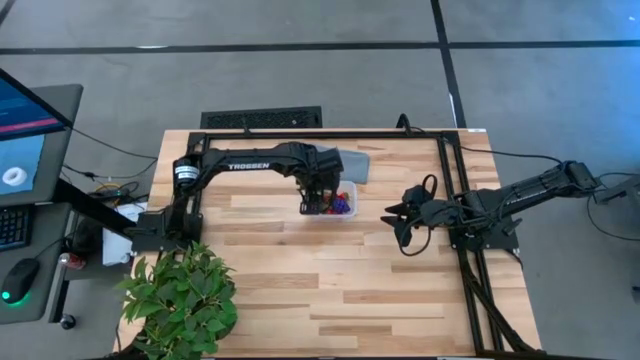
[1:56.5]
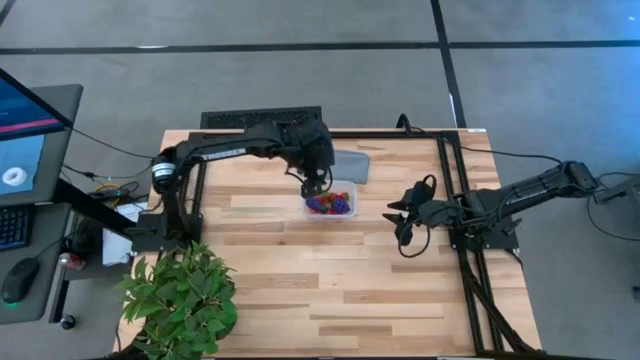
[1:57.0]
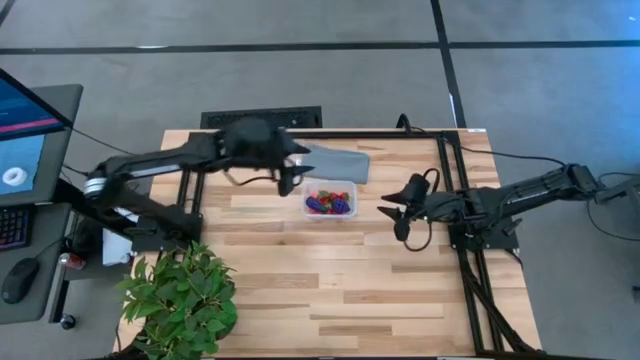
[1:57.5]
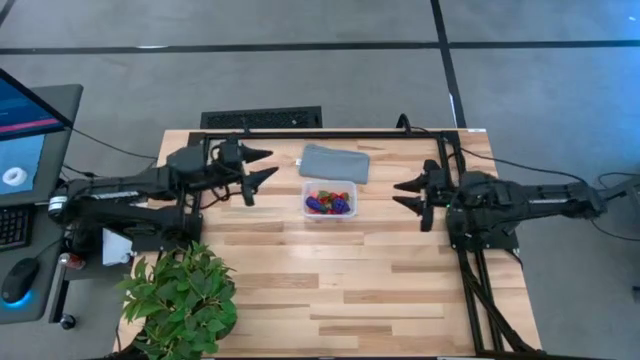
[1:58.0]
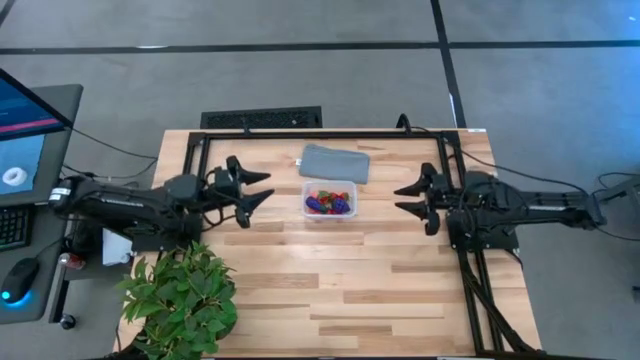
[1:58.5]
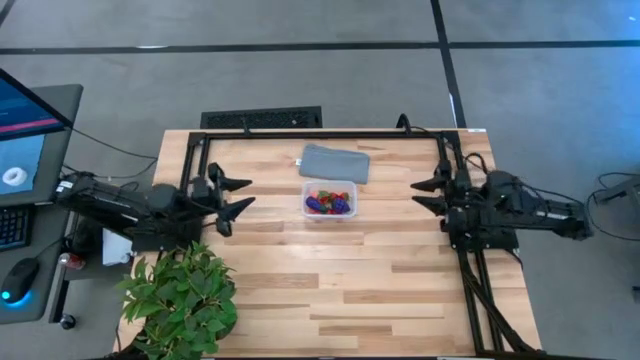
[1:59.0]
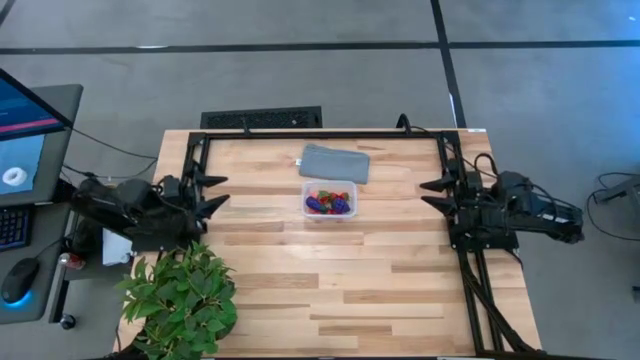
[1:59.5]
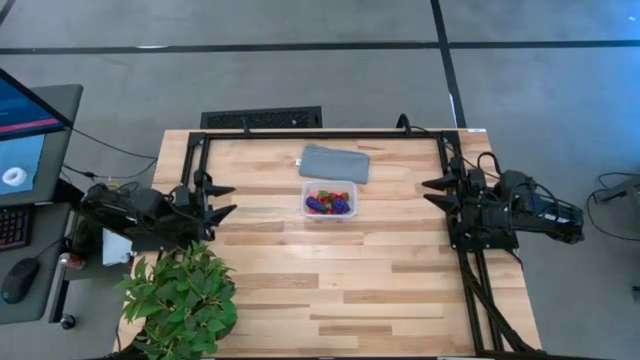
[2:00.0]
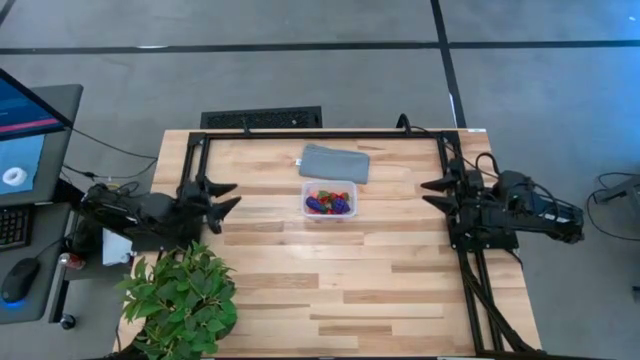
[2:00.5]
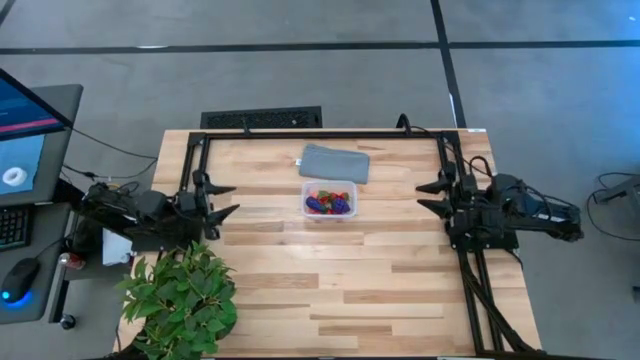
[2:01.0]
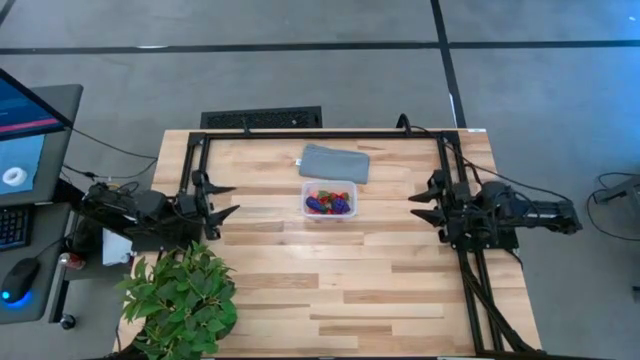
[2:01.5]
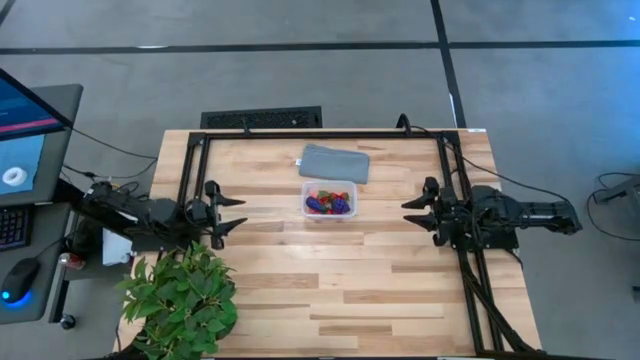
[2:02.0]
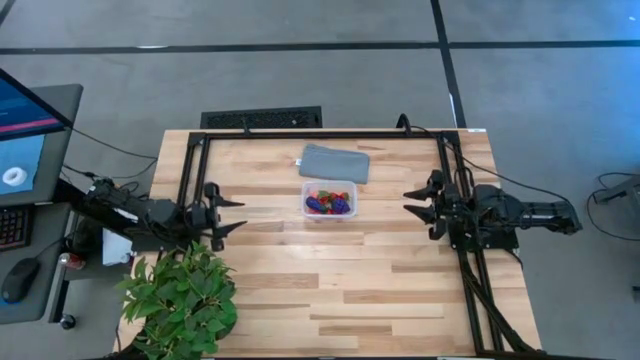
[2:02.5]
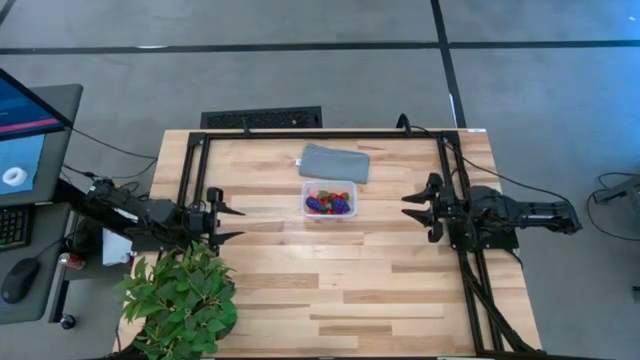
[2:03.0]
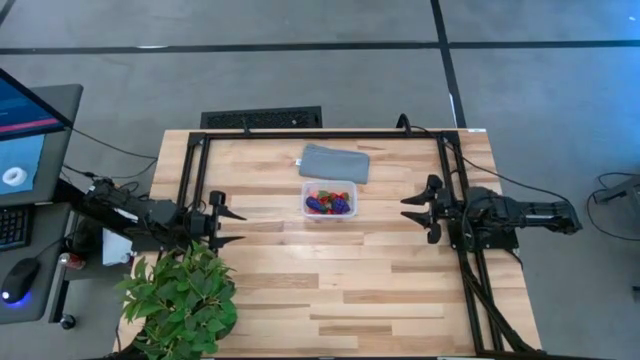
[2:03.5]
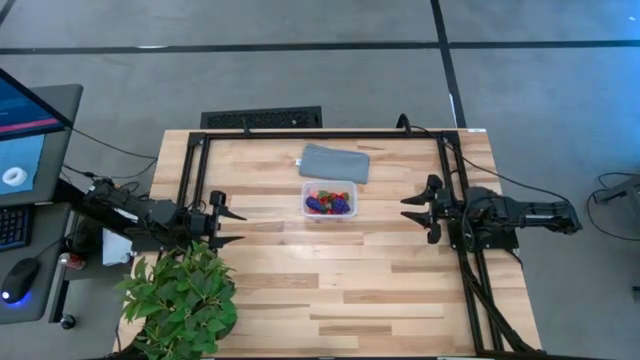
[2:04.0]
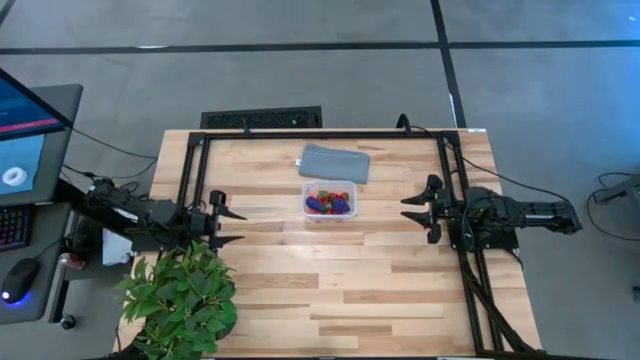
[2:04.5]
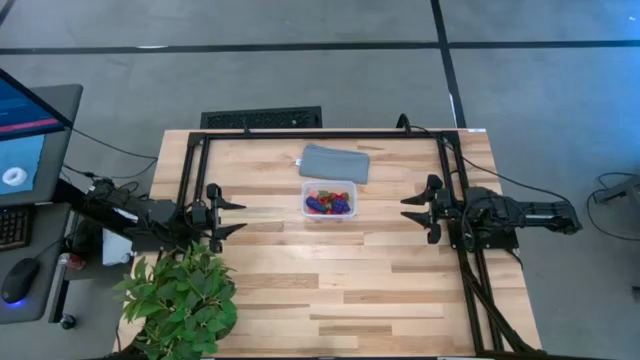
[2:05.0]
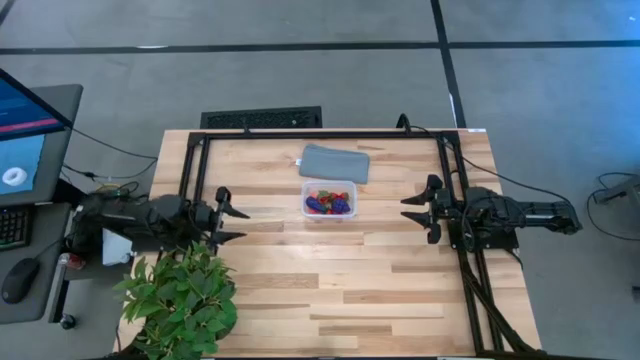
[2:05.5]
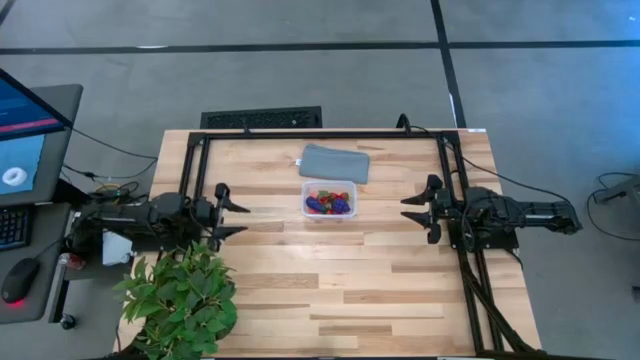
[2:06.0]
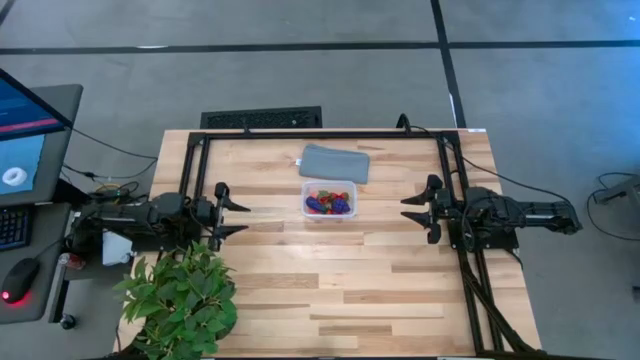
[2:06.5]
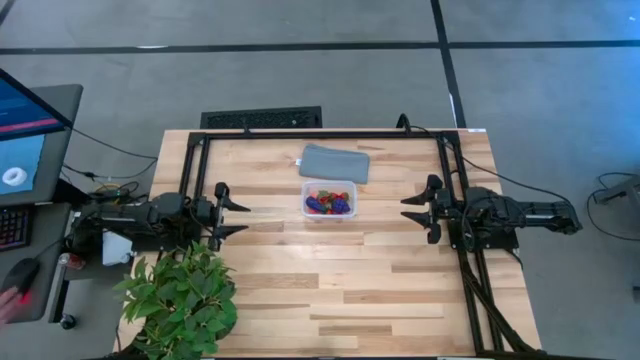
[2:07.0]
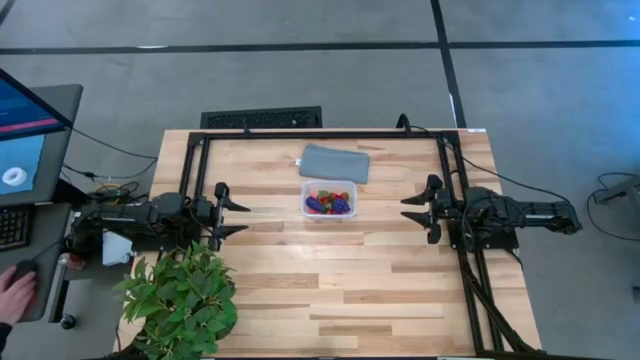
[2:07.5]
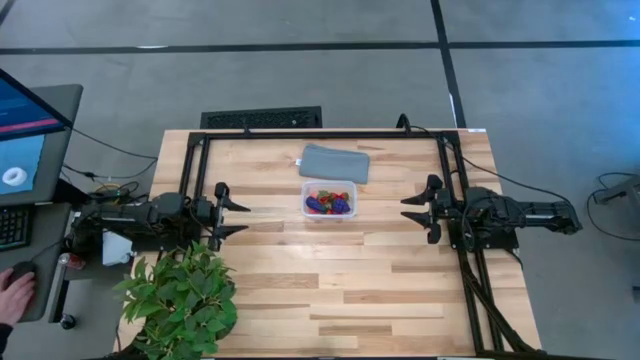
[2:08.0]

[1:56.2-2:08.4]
Task: Pick and placing Produce into tupperware
Return to Home Position

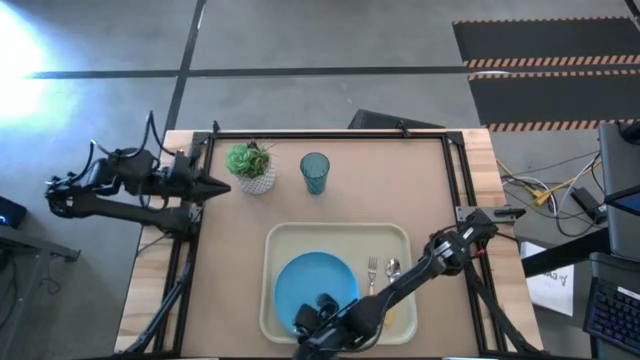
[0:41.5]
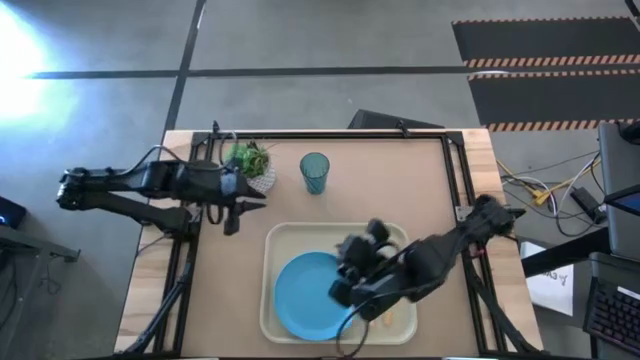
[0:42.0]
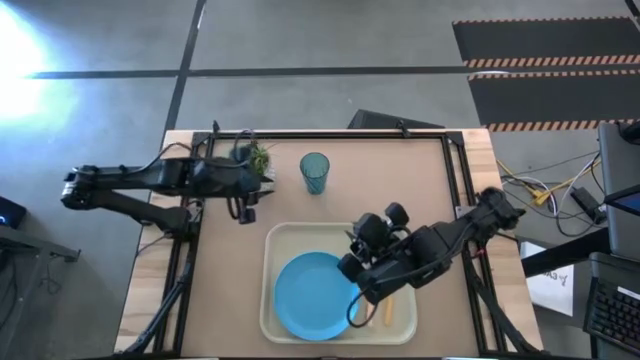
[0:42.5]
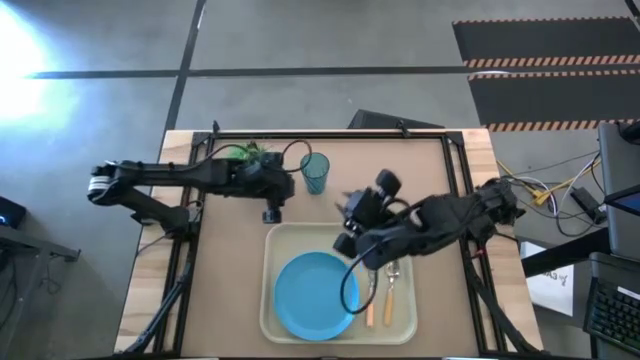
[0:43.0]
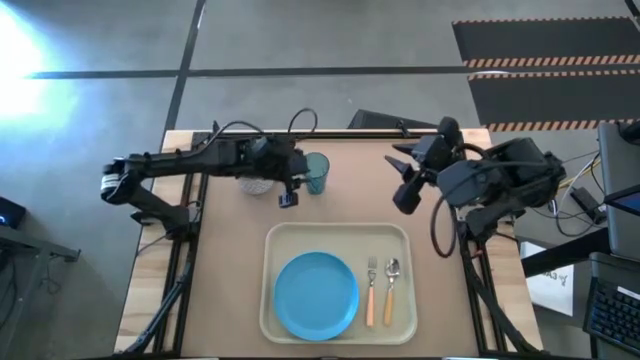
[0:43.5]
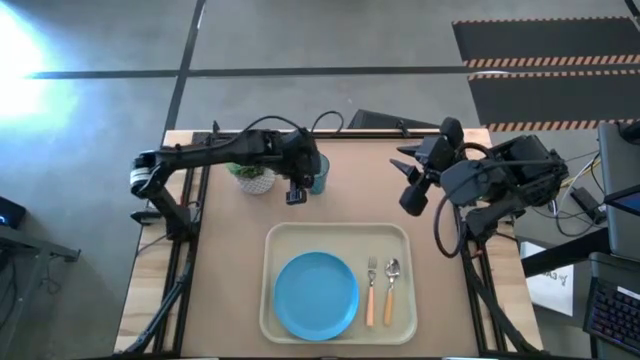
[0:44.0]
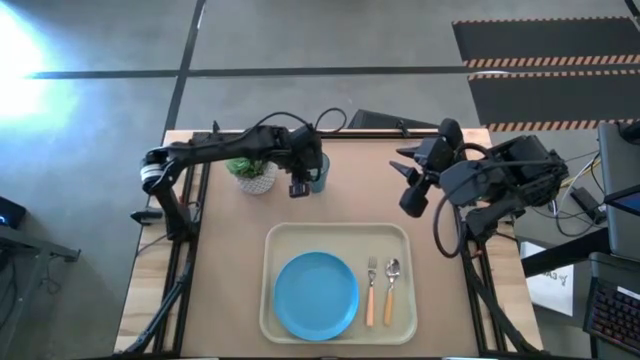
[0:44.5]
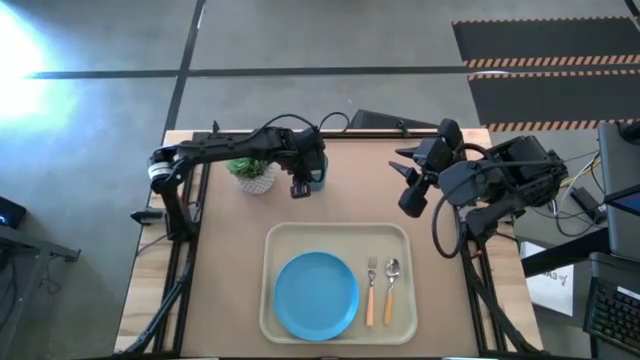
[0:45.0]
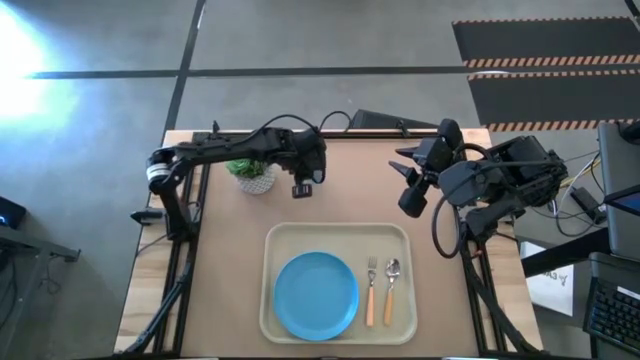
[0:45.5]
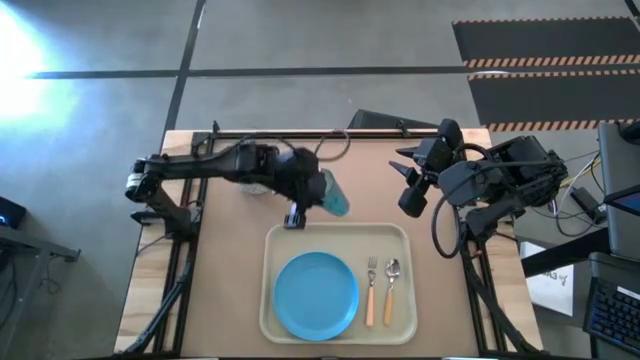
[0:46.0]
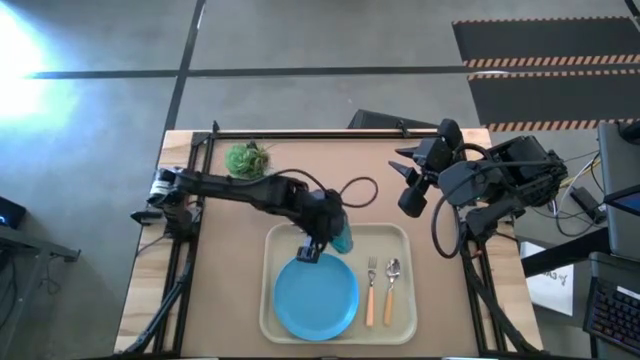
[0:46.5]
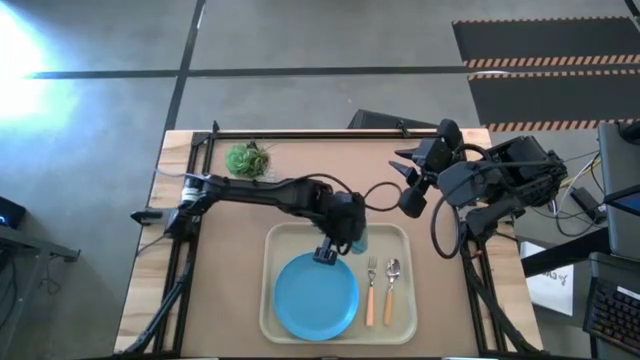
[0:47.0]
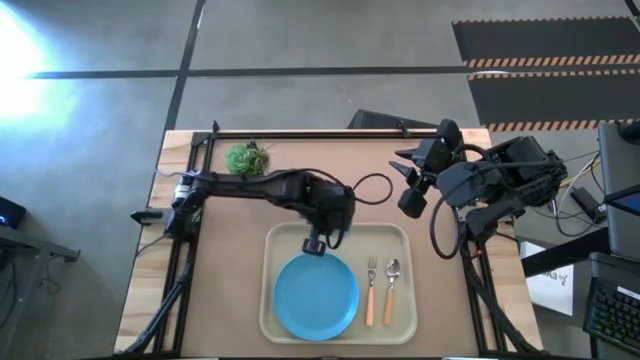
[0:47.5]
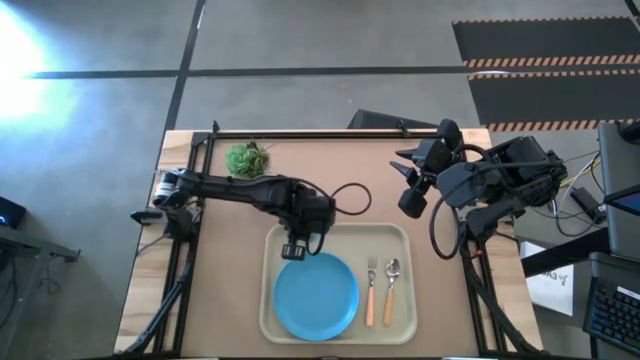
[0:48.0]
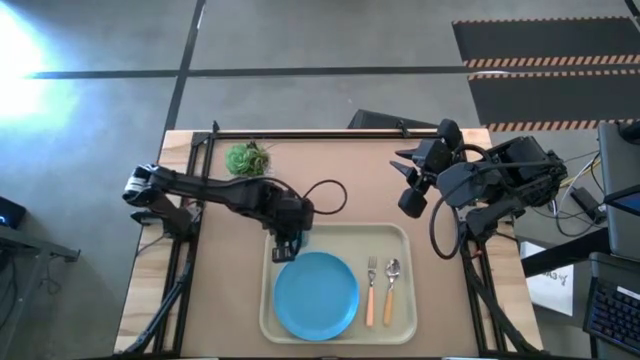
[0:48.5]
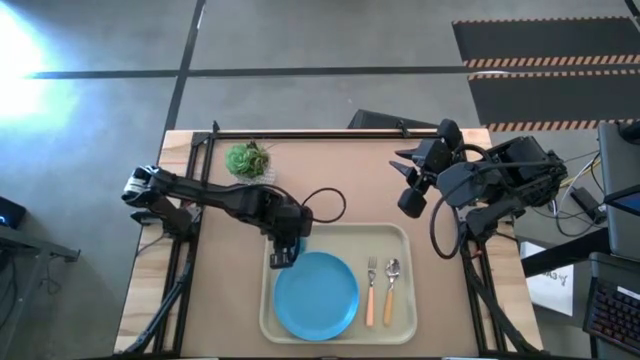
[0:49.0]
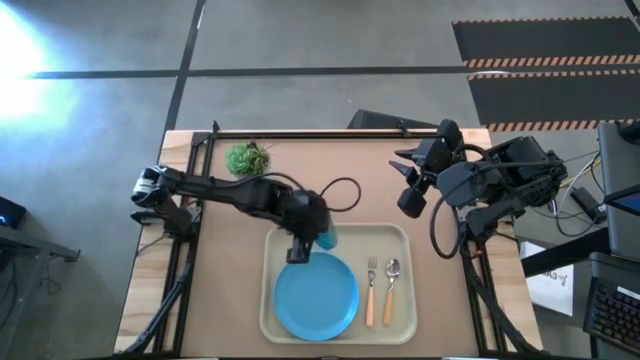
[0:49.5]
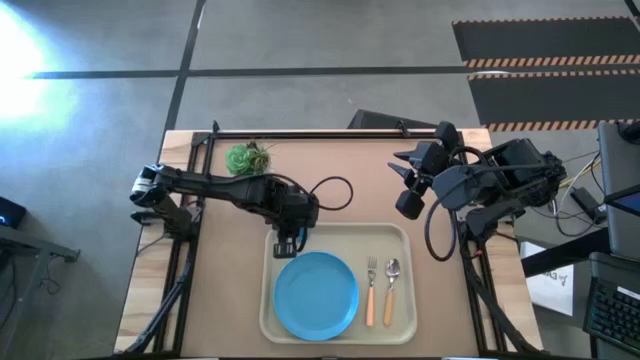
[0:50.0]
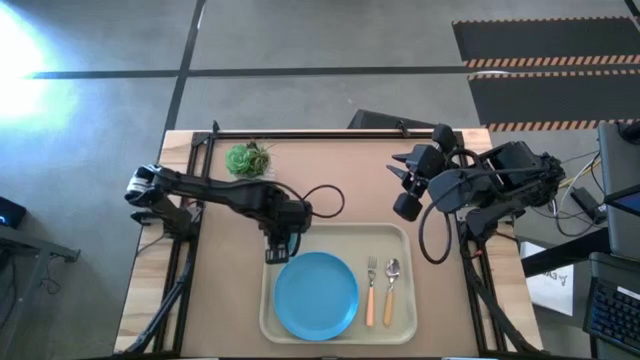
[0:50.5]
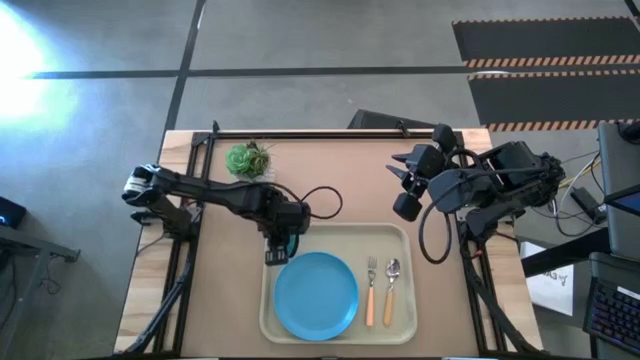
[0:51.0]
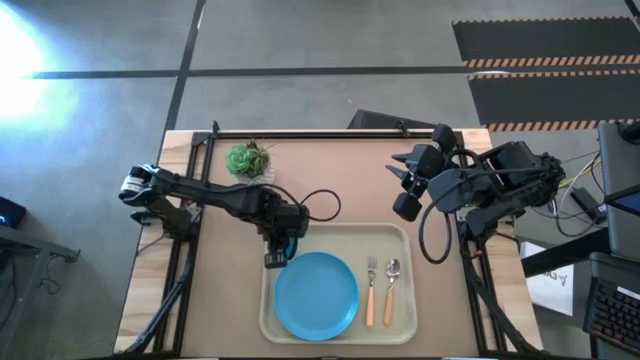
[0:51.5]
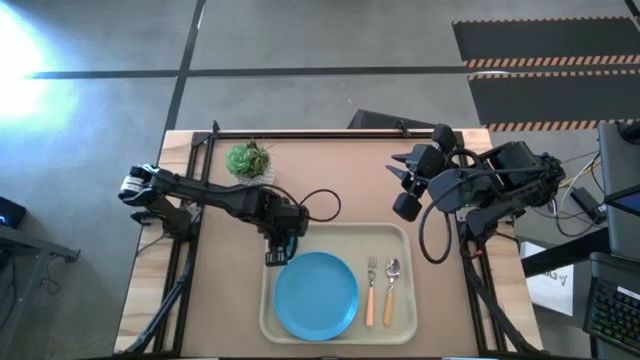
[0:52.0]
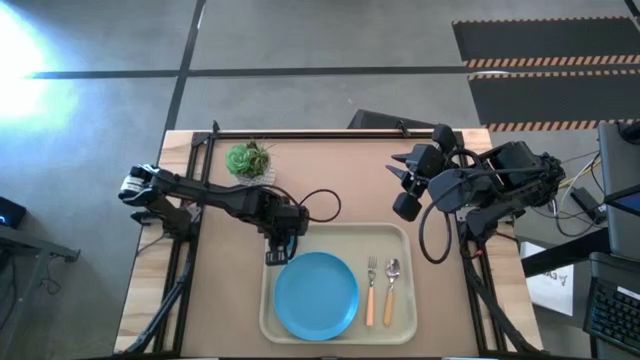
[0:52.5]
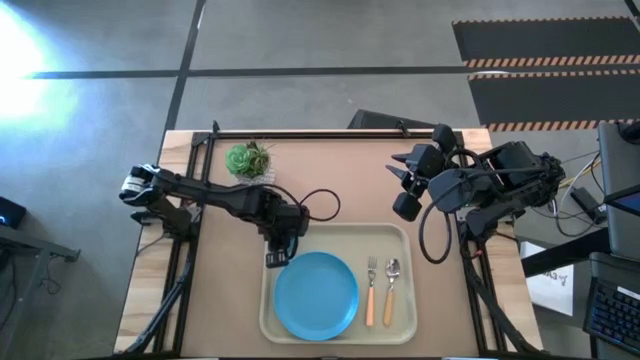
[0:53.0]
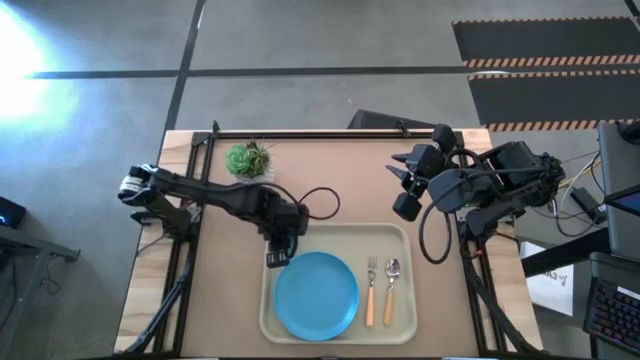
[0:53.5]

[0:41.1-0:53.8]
Task: Pick and place plate/cup/fork/spoon on tray
Put the blue cup on the gray tray to the top left of the blue plate
